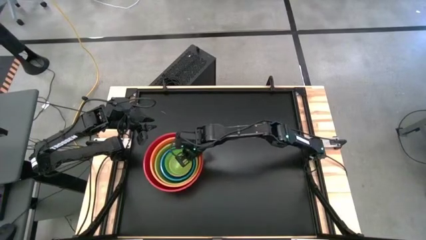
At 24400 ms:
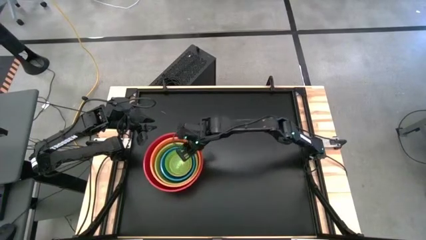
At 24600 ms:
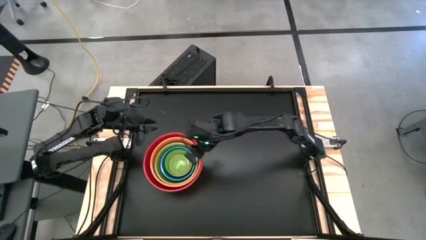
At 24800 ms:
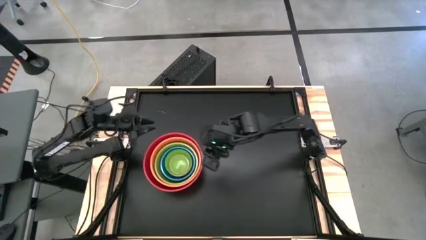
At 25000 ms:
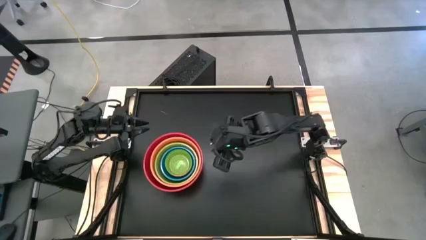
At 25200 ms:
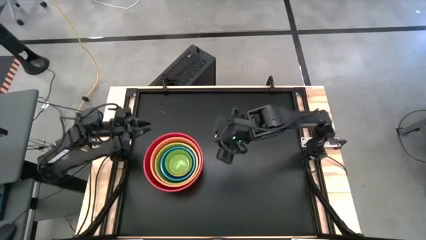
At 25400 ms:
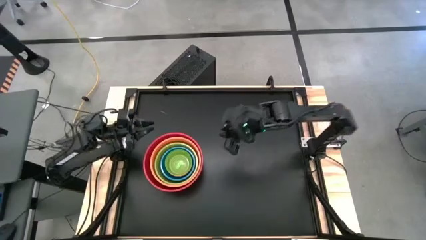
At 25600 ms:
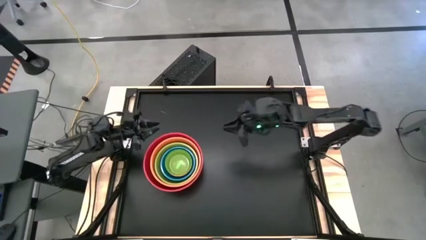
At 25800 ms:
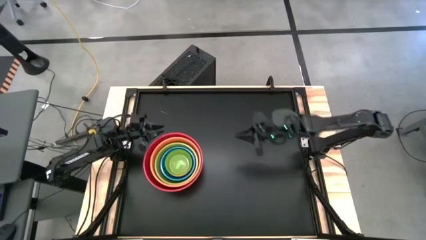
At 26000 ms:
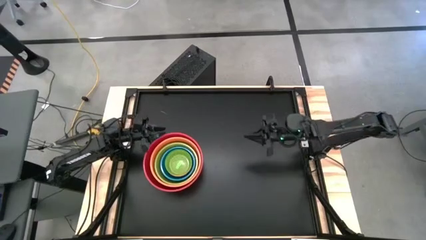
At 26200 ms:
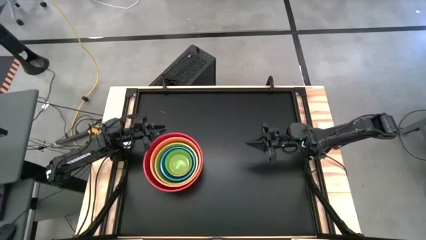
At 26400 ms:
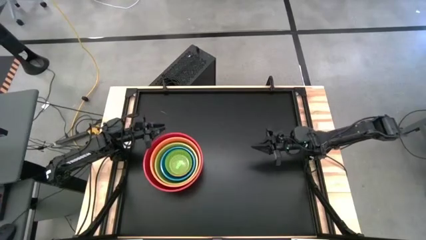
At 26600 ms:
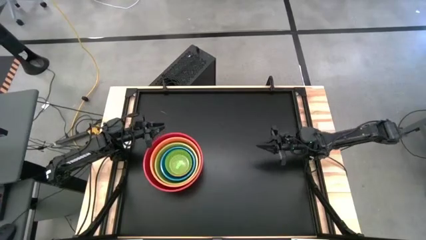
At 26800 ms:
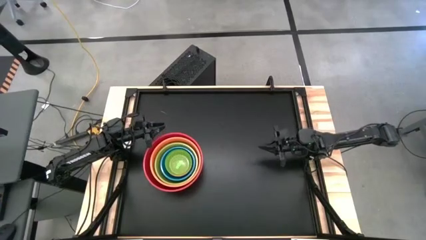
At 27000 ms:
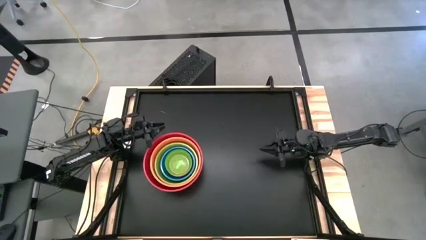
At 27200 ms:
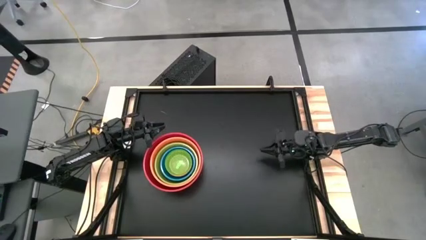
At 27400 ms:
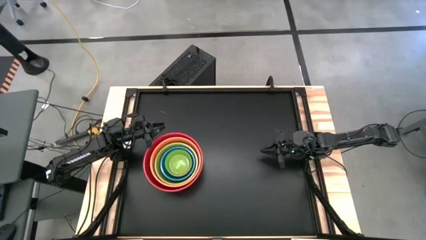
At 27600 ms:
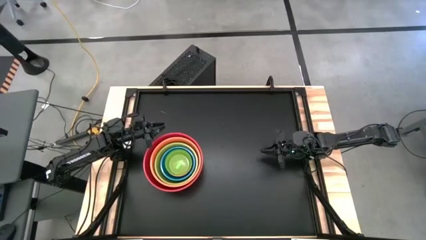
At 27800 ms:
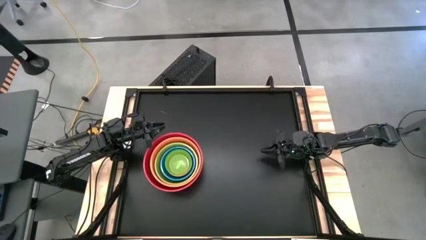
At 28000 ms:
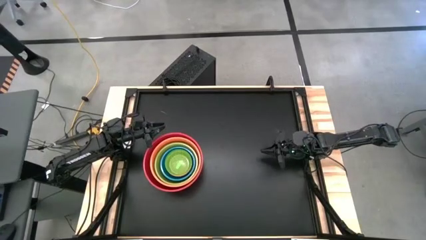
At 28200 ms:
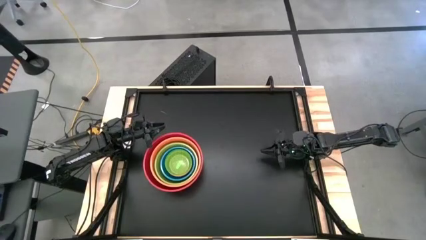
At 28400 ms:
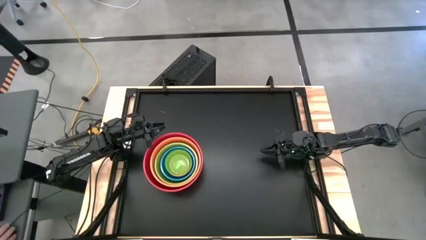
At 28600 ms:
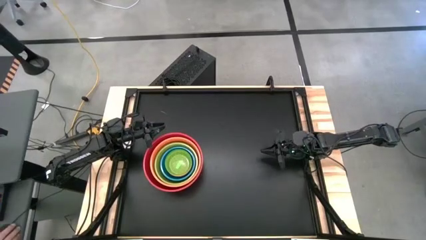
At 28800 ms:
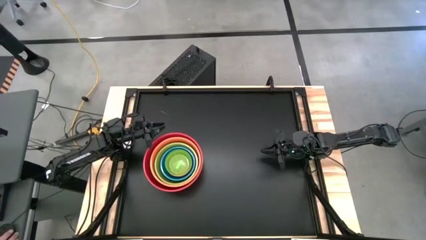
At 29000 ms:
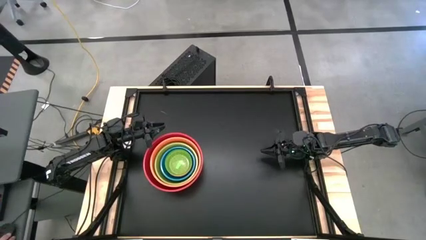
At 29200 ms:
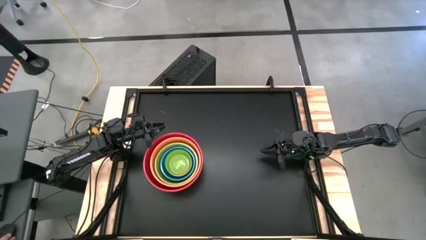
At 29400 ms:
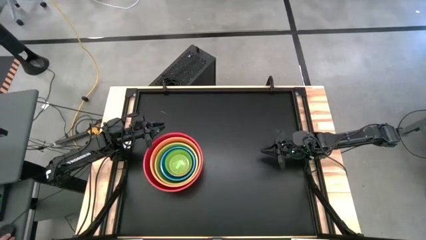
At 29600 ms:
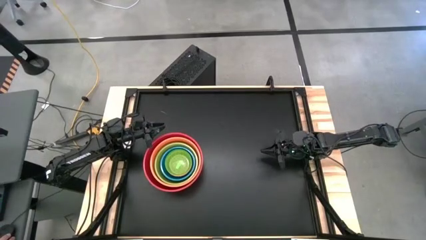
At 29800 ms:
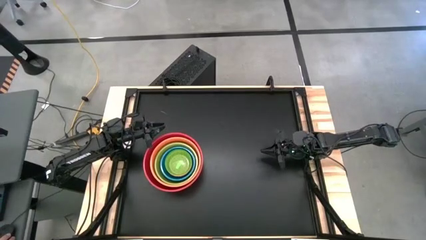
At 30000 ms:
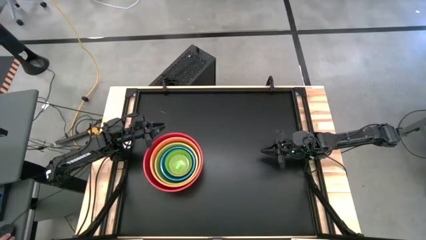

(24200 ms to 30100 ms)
Return to Home Position

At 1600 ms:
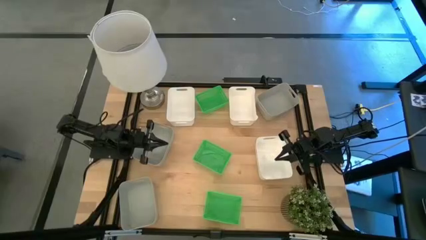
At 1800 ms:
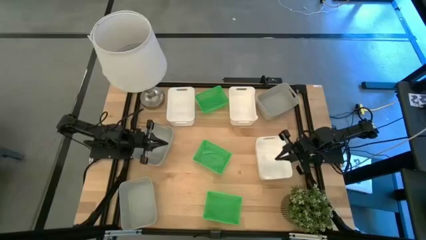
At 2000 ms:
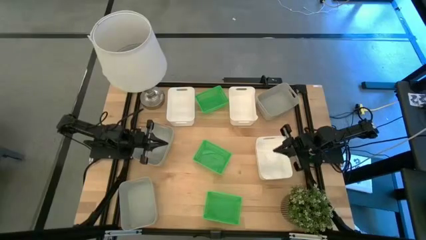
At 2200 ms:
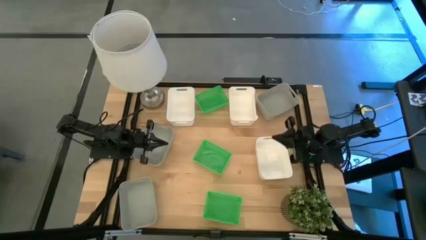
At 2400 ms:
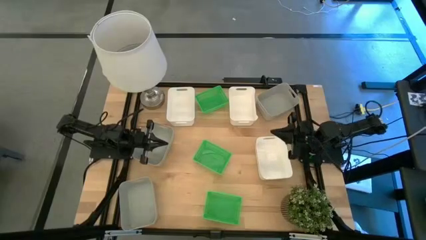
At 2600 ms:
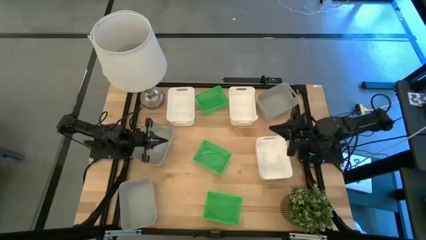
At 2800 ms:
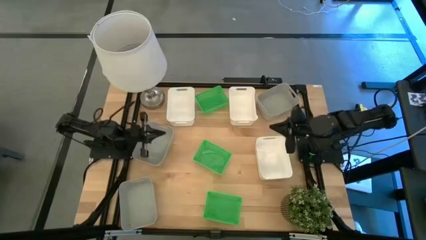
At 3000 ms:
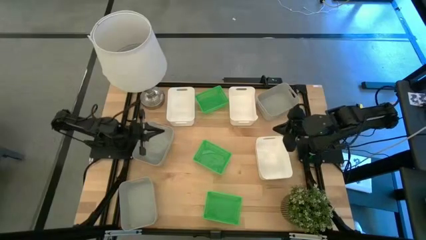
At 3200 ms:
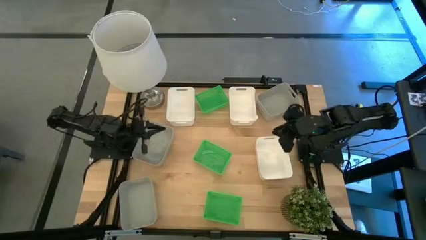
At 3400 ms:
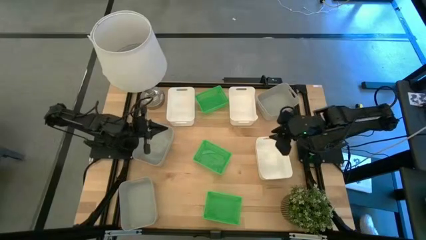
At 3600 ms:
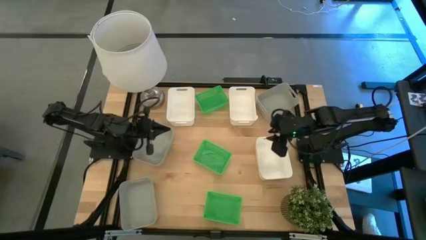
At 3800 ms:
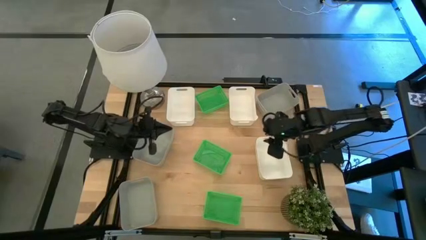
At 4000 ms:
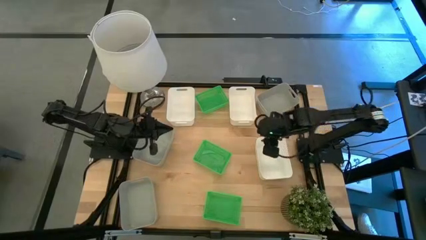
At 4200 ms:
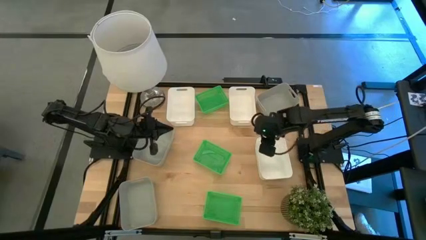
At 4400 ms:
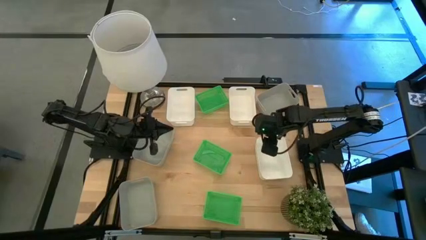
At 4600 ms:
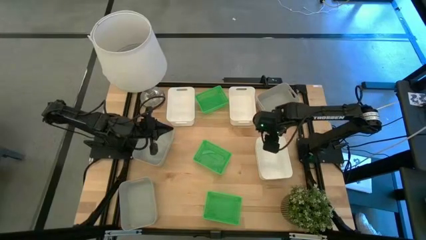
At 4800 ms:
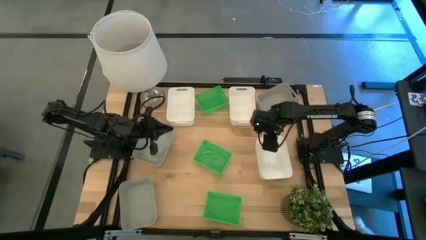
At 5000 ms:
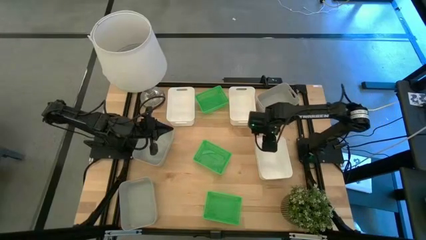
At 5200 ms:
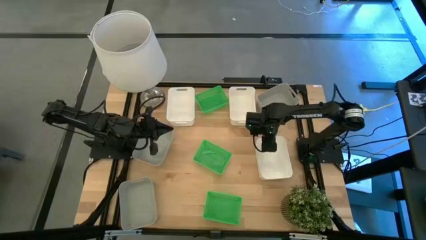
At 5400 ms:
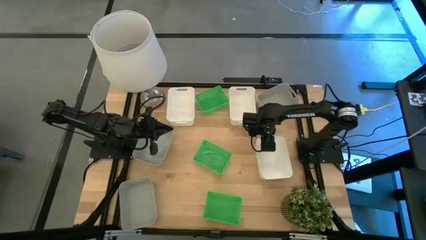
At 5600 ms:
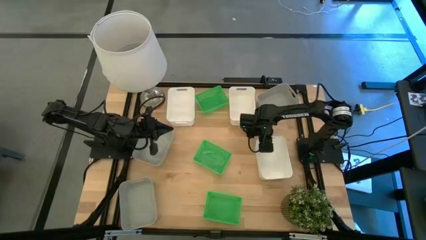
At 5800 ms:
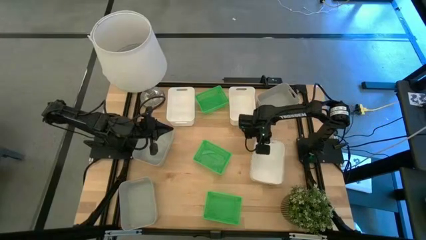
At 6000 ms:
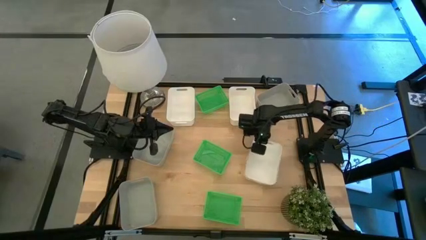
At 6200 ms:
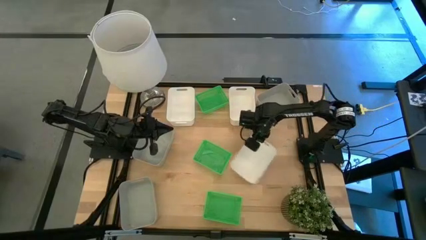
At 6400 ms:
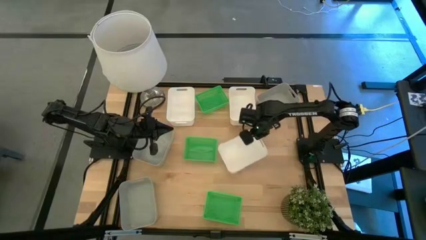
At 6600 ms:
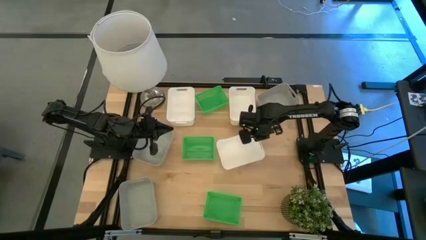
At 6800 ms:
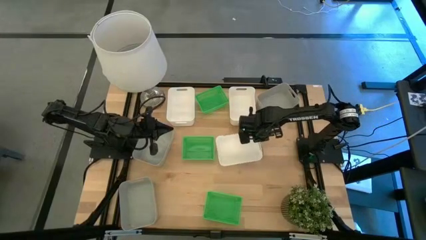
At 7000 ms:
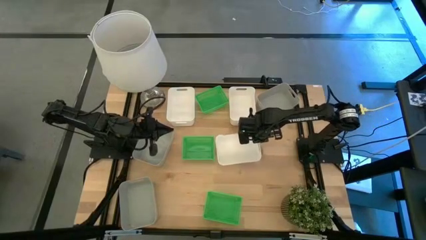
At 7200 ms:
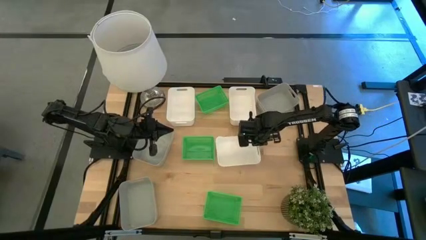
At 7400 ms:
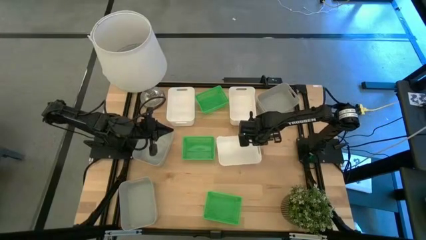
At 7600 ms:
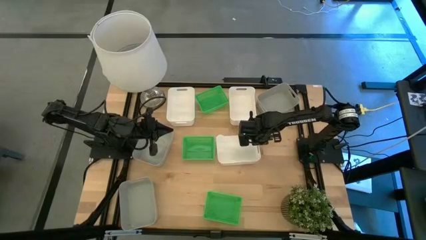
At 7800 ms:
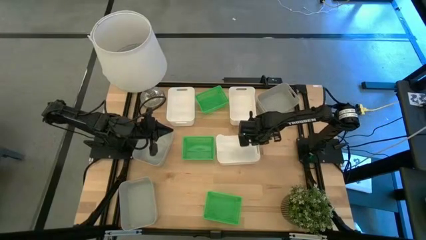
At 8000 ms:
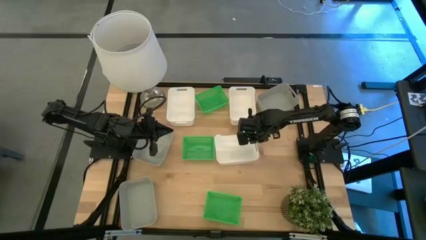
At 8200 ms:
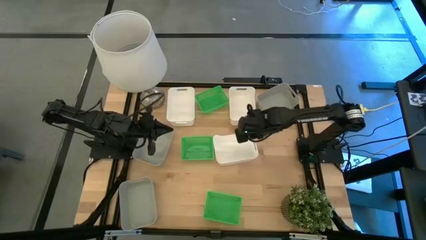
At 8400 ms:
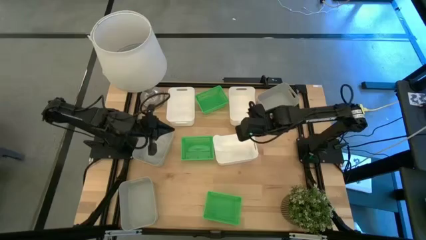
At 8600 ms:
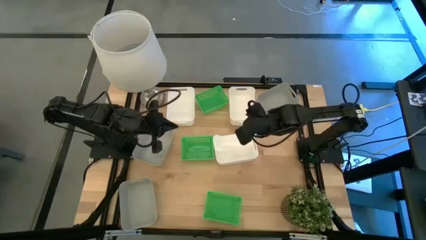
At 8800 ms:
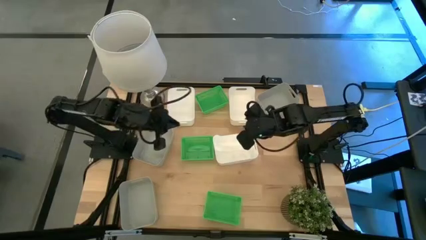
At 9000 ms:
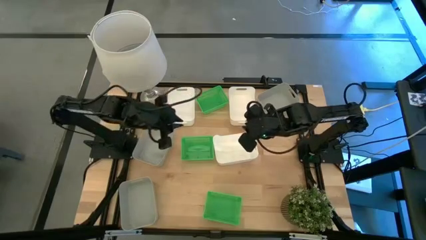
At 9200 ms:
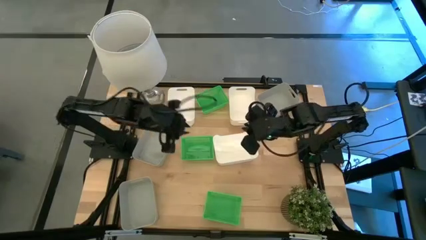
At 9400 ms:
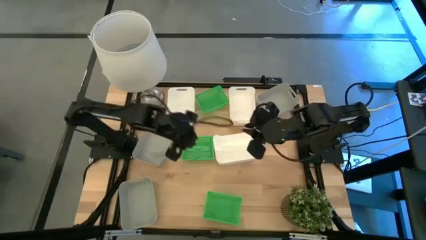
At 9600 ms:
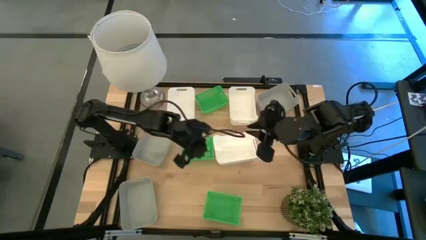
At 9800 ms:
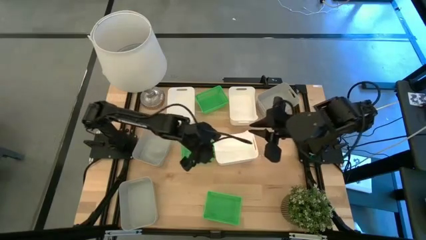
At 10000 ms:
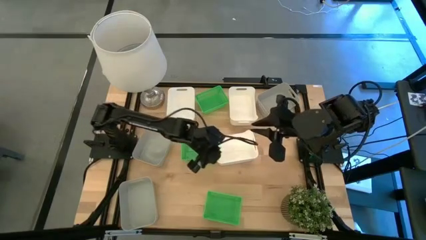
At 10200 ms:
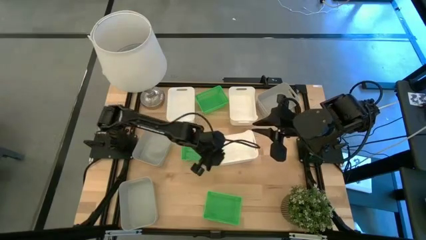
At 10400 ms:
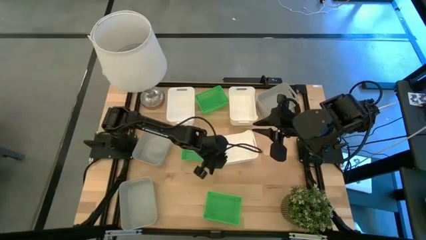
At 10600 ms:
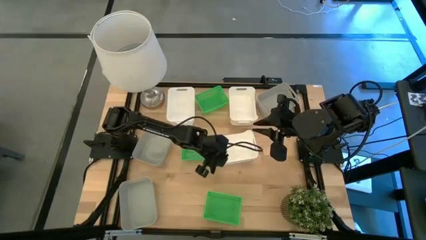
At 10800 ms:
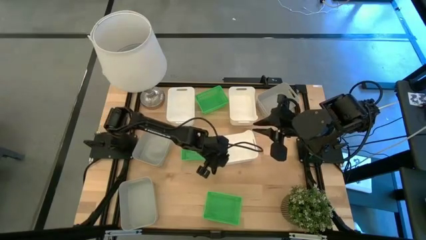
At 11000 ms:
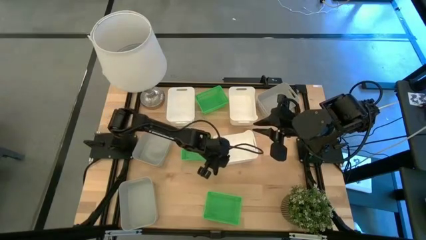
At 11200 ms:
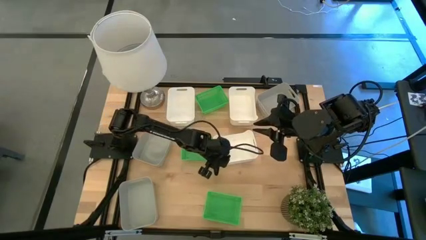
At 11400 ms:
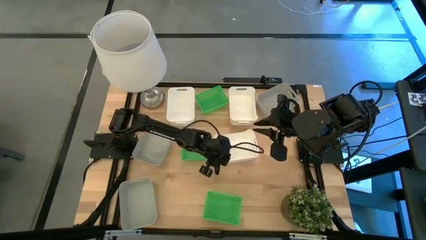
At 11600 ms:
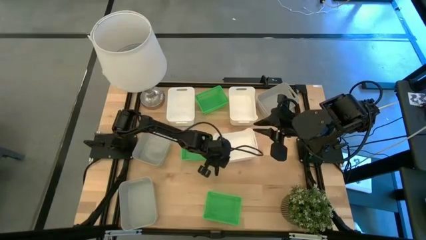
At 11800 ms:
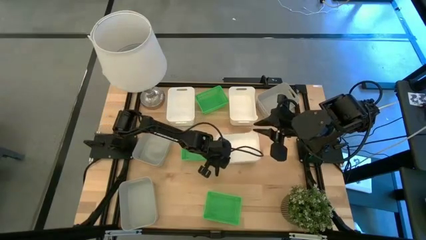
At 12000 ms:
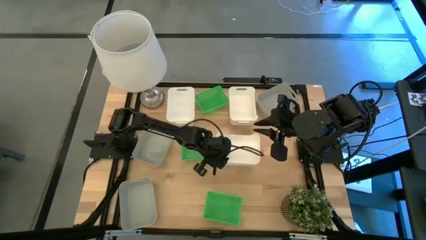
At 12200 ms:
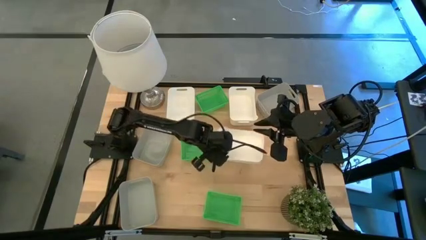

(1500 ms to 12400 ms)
Stack the bottom white bin on top of the top right white bin
